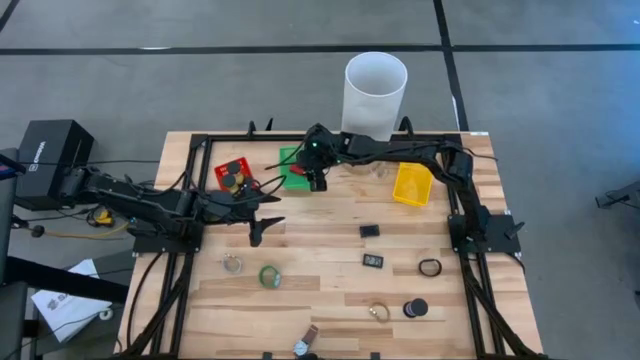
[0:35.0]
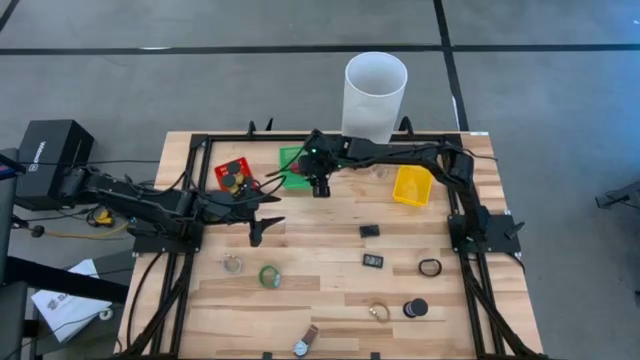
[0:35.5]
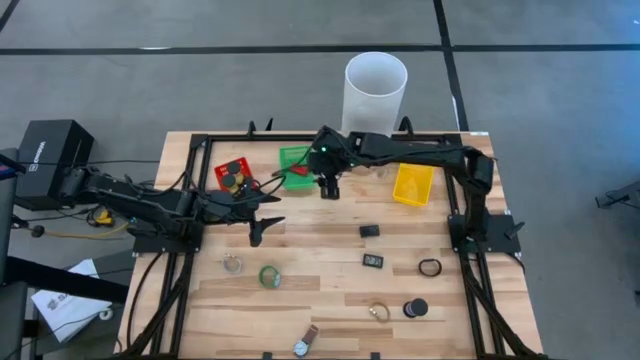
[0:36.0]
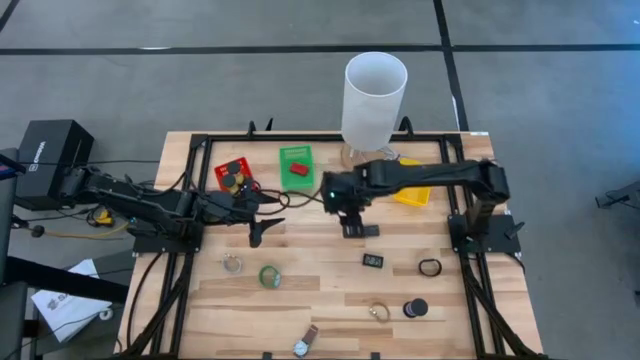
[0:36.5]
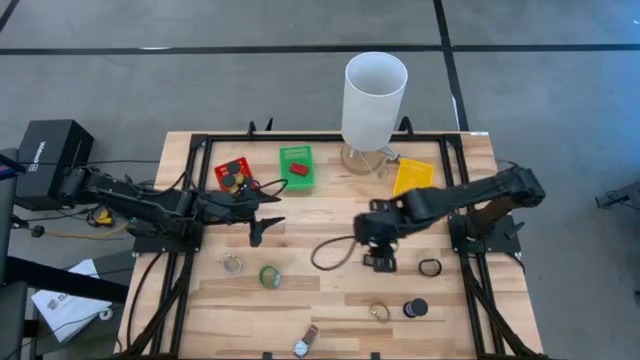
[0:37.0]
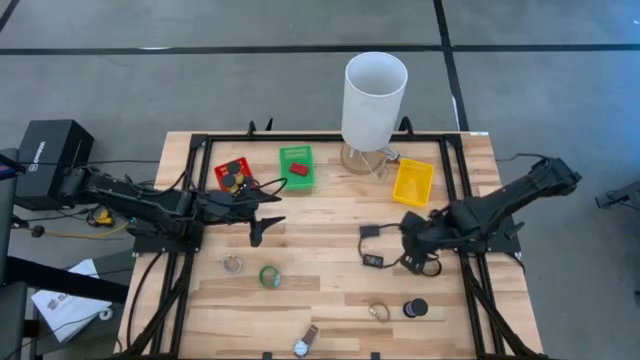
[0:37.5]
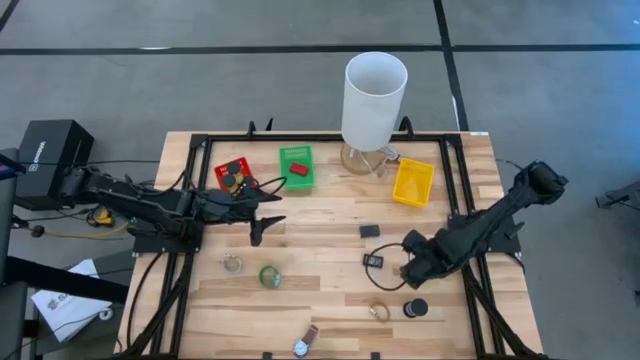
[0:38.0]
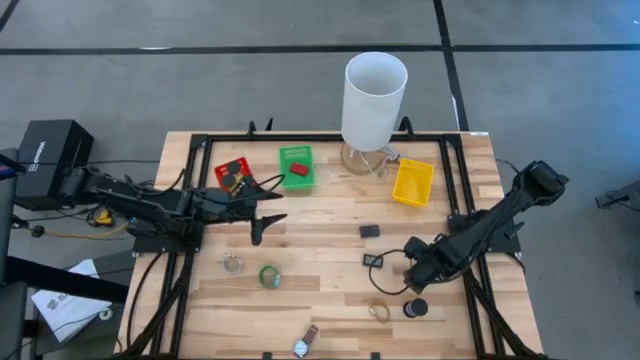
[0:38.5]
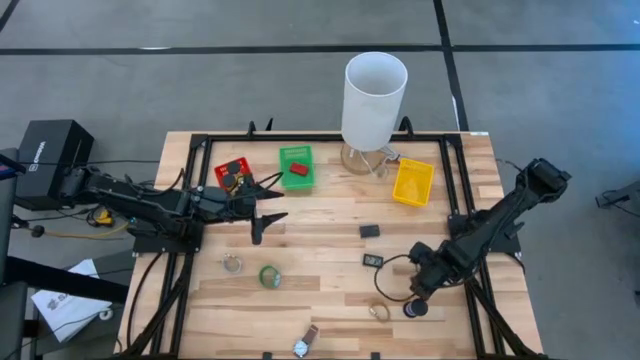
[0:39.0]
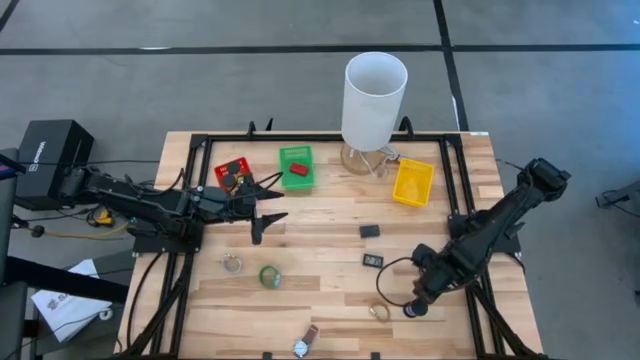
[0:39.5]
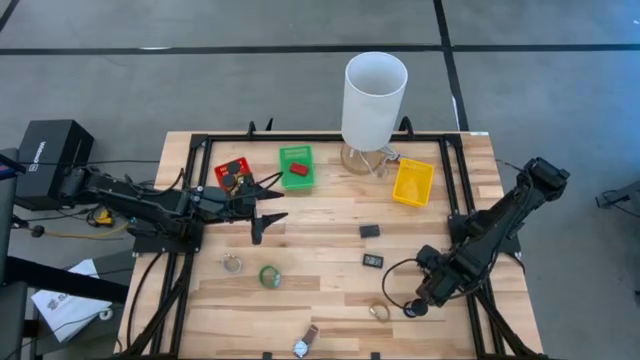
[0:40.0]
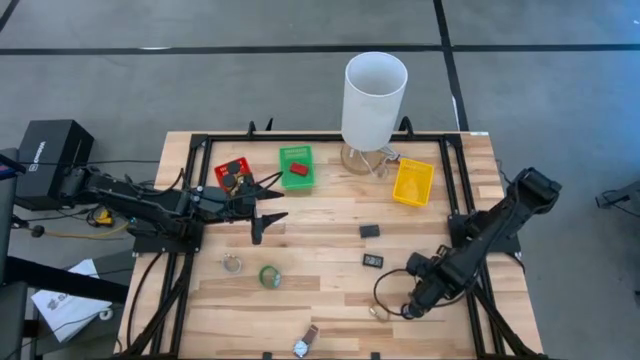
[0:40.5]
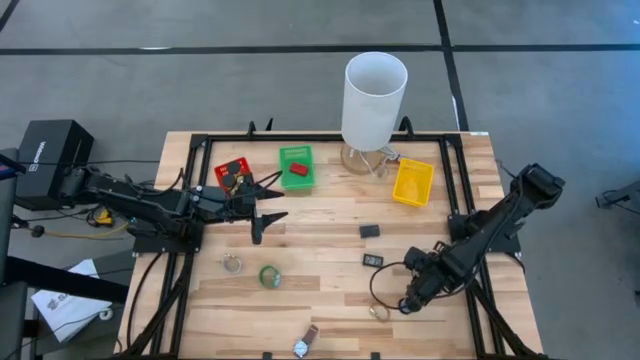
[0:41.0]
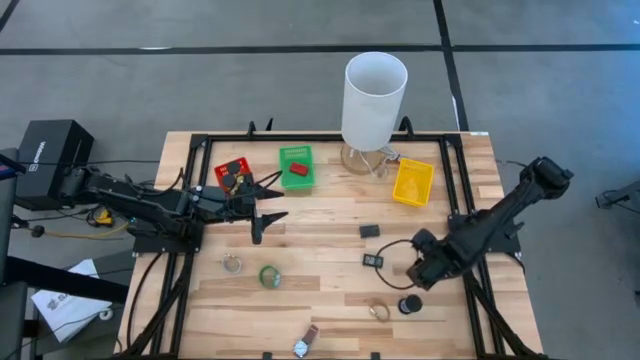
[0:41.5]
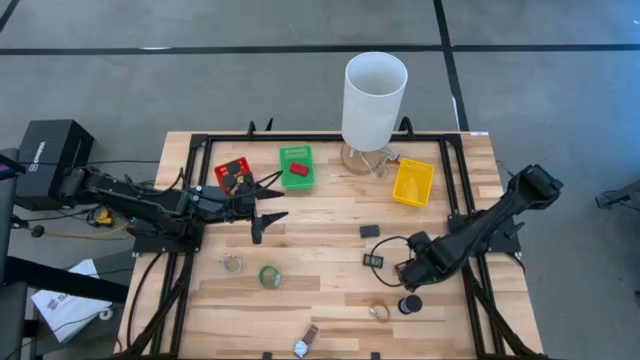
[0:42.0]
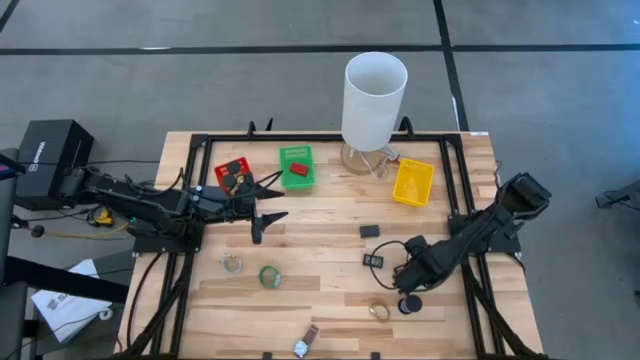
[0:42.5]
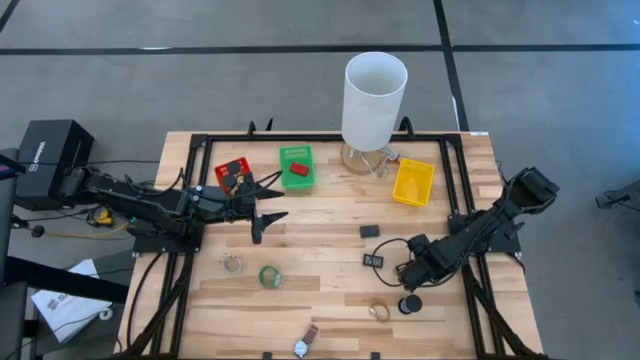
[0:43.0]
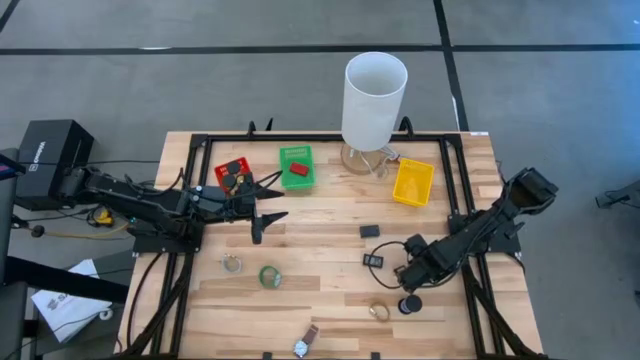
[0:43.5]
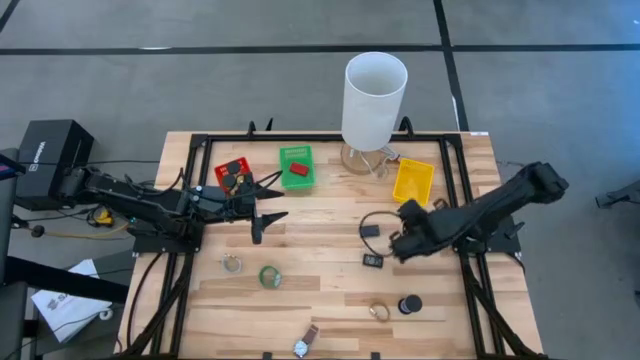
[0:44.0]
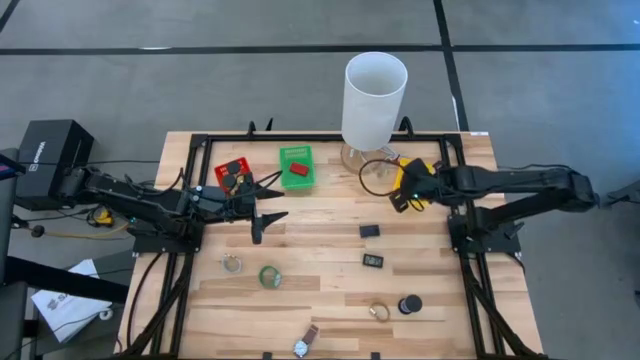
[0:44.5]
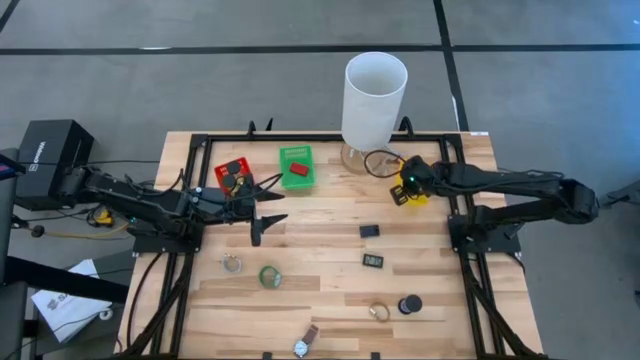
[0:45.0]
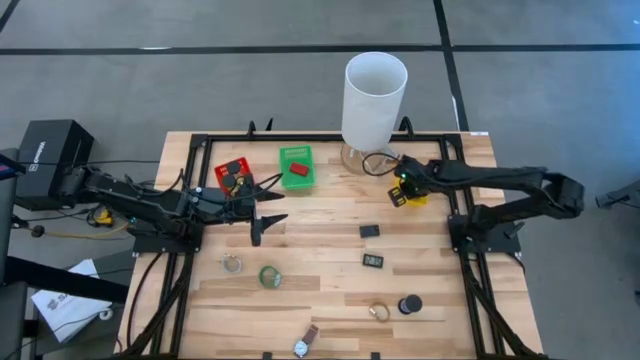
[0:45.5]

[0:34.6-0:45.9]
Task: Pick & Place Office items
Put the black wrist watch into the yellow bin

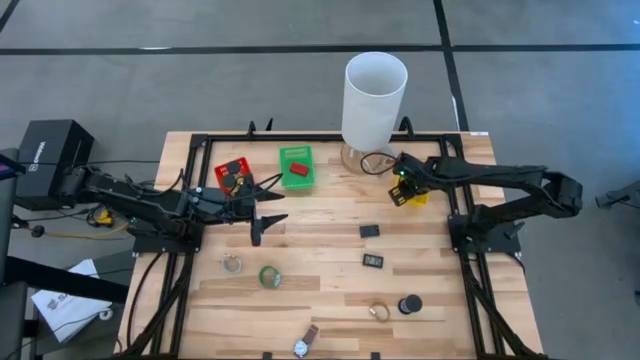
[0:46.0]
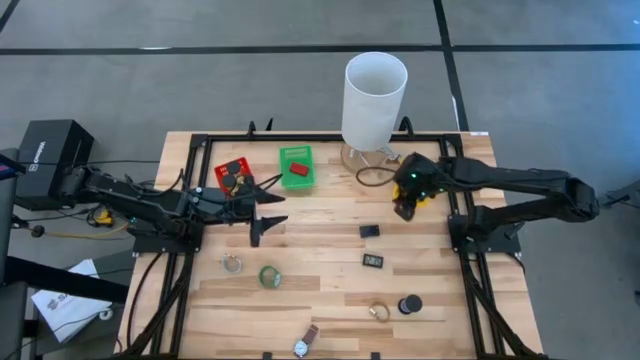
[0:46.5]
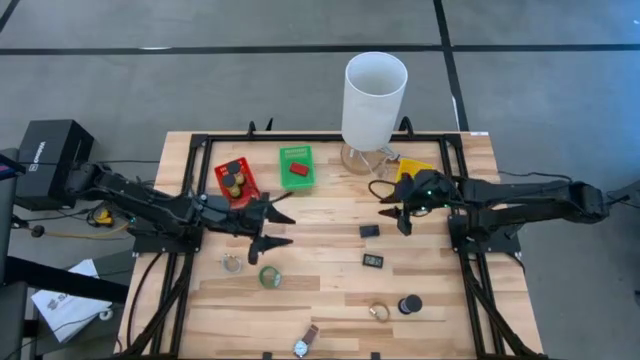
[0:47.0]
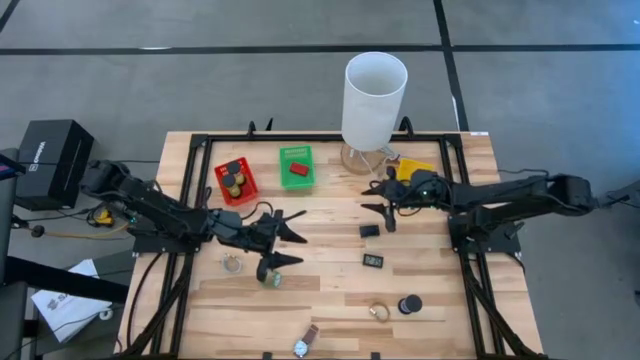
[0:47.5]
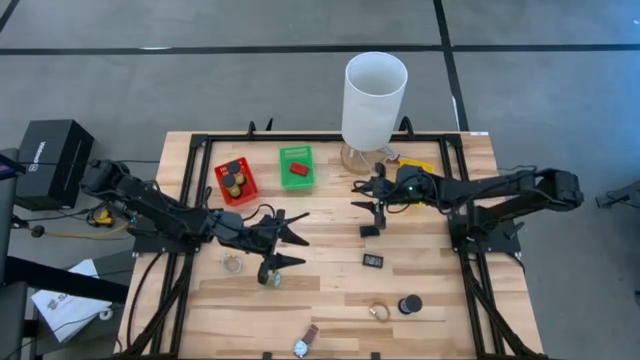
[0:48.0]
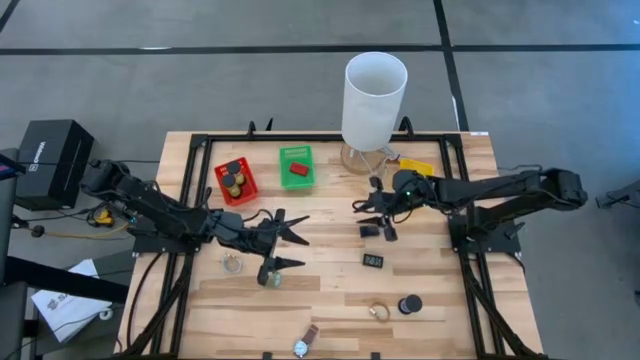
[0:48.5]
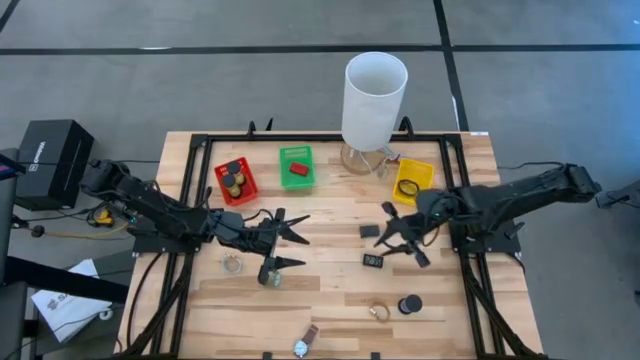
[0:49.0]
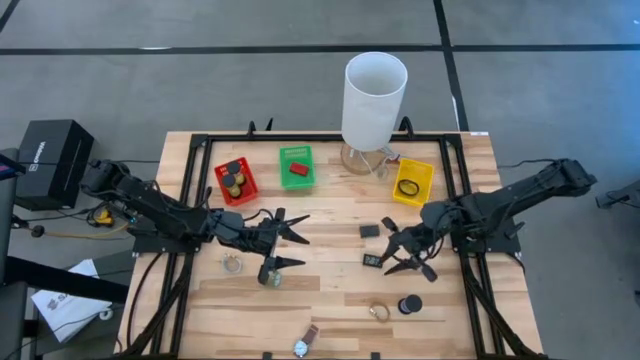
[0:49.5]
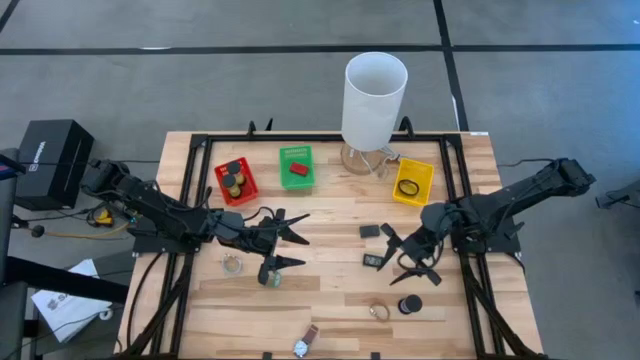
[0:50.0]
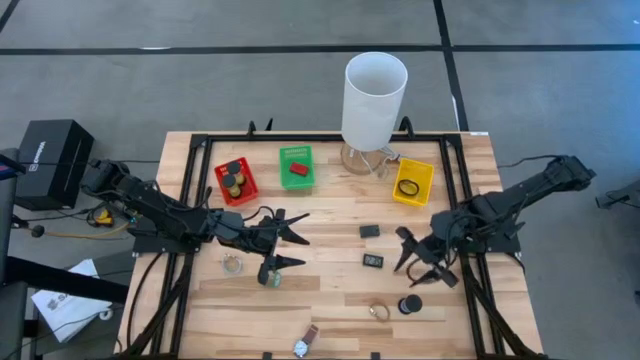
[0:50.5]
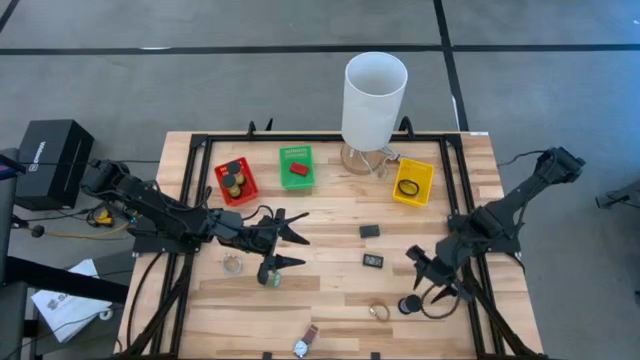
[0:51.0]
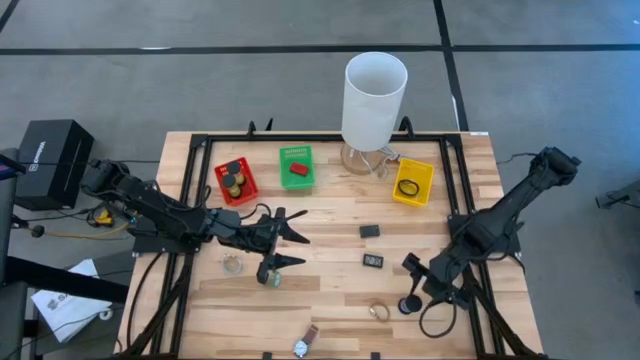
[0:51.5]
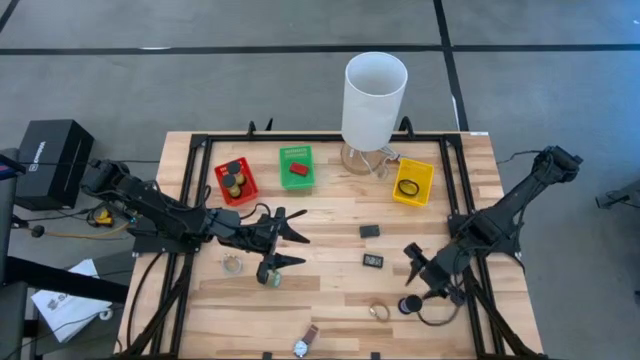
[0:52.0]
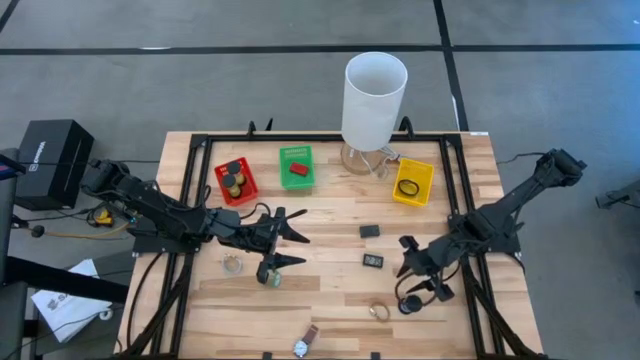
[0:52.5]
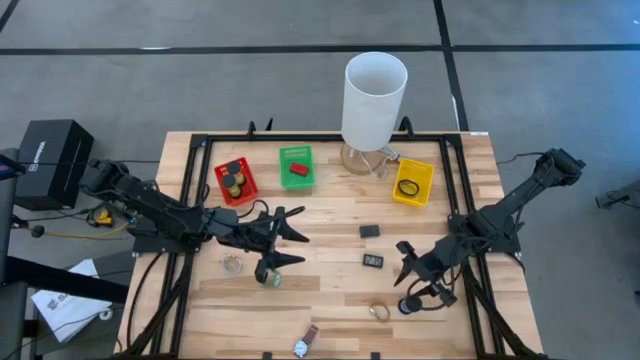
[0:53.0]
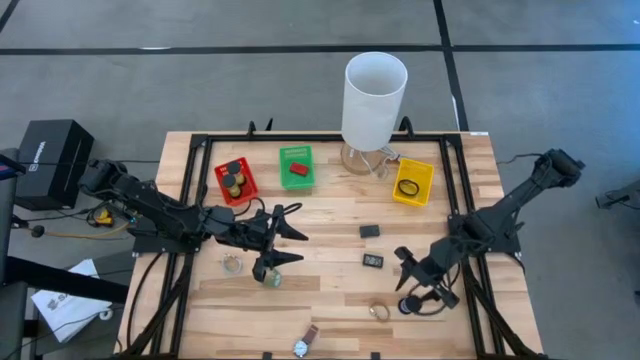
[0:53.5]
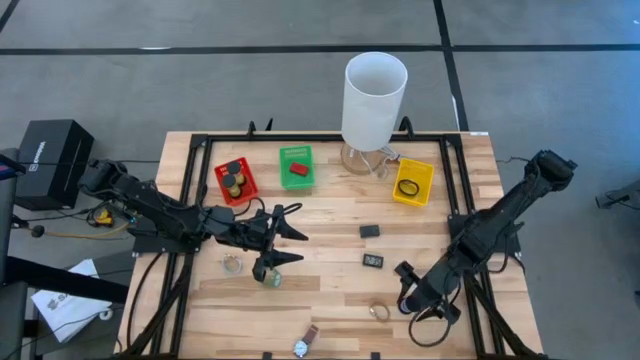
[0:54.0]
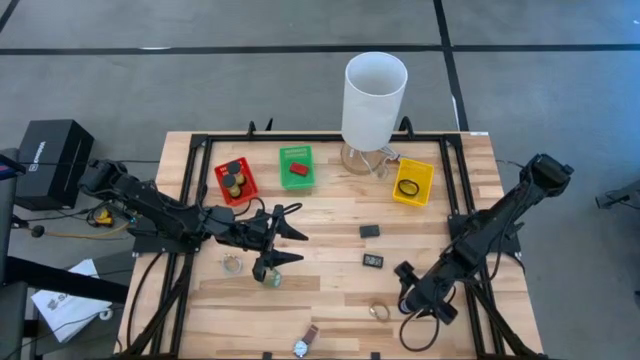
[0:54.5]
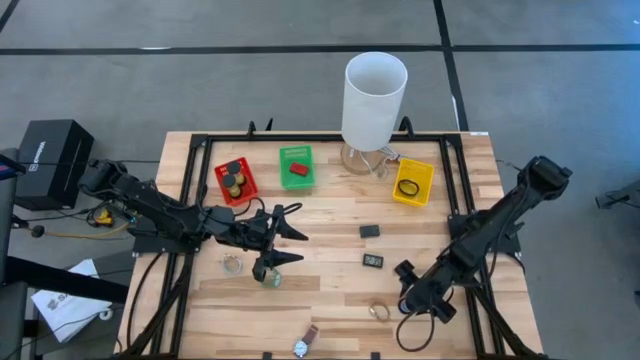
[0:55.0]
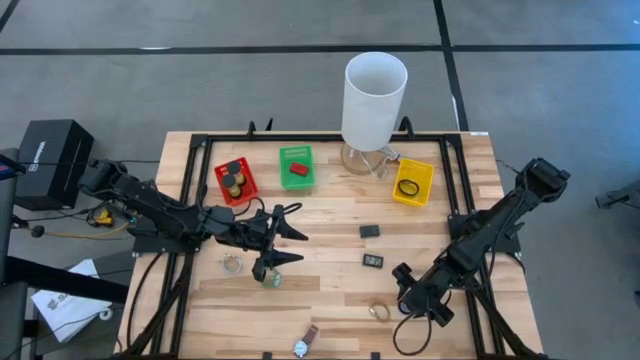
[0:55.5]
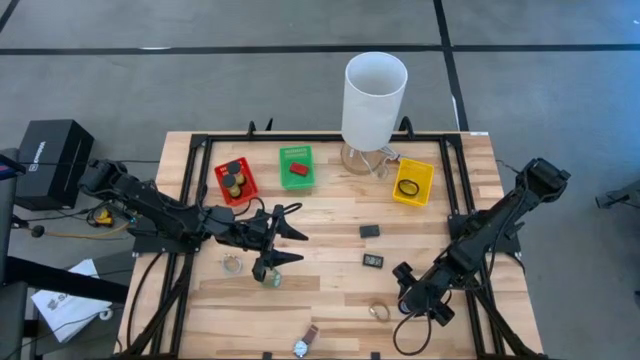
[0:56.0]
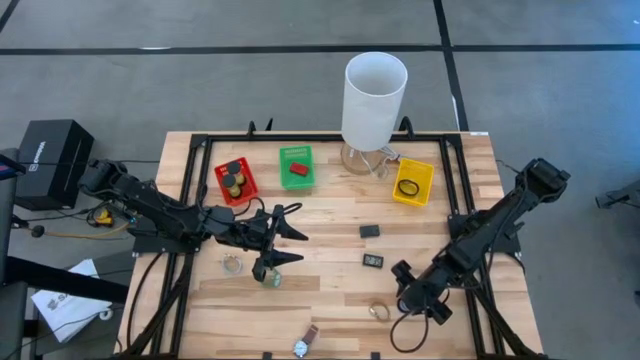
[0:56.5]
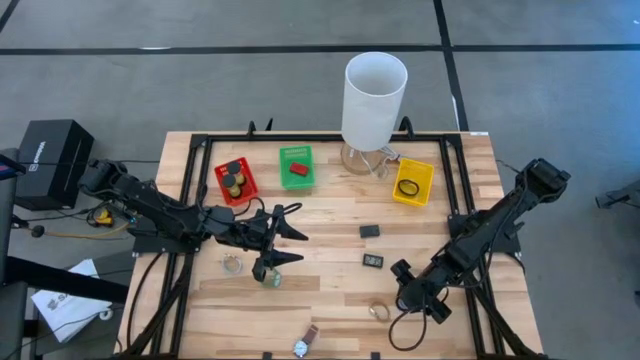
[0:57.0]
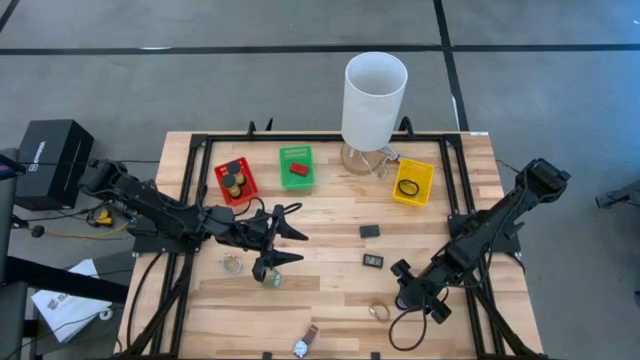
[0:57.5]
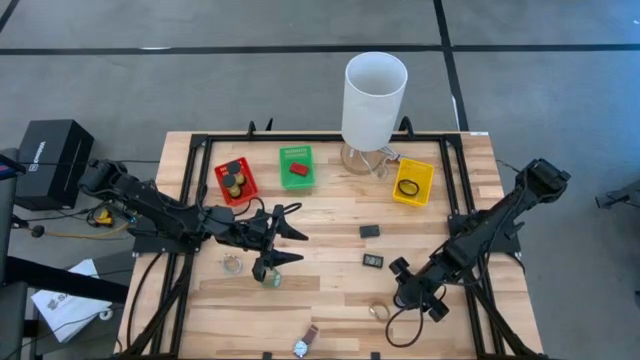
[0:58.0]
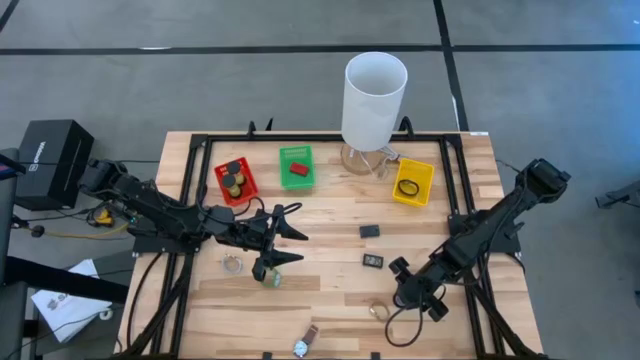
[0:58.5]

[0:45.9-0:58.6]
Put the blue hourglass into the orange bin
